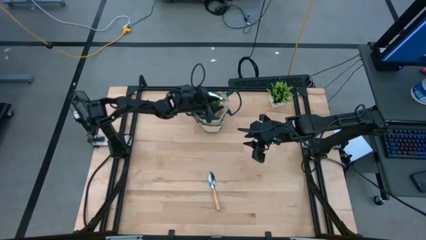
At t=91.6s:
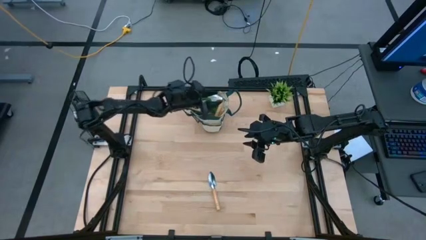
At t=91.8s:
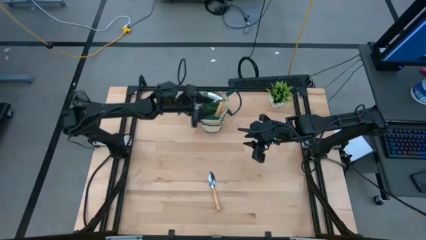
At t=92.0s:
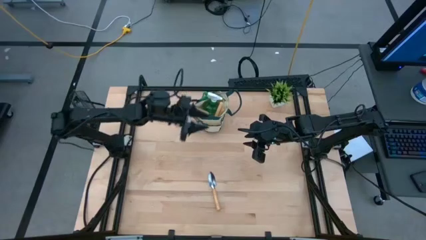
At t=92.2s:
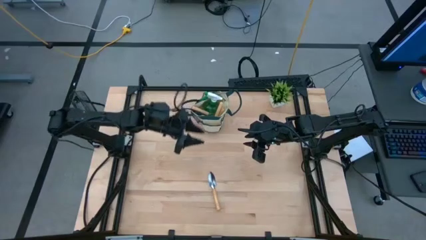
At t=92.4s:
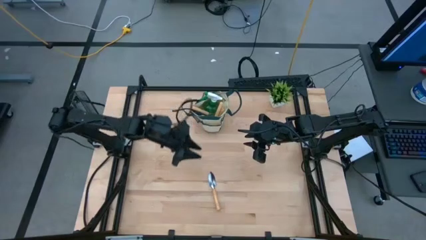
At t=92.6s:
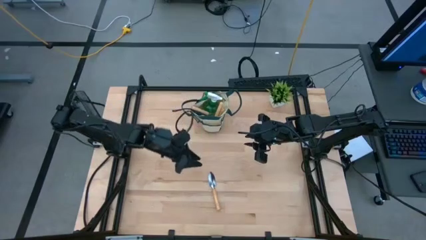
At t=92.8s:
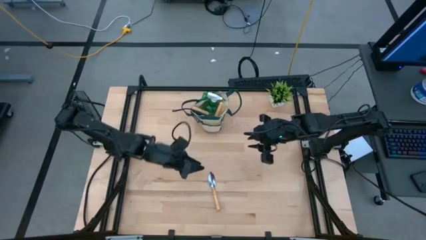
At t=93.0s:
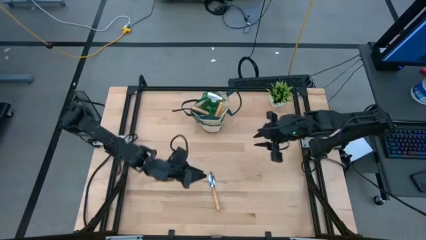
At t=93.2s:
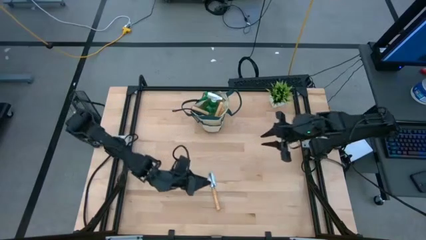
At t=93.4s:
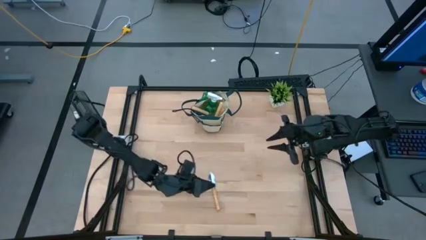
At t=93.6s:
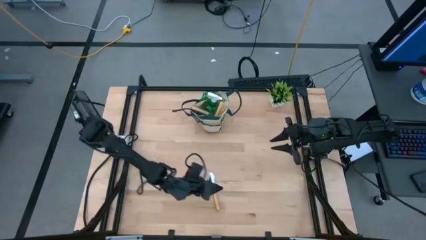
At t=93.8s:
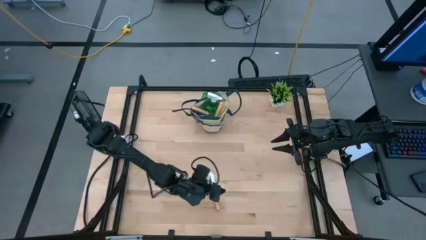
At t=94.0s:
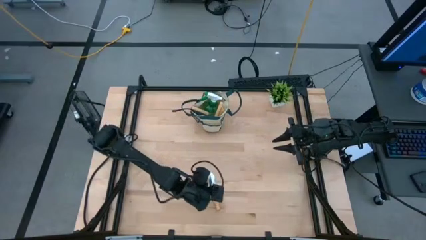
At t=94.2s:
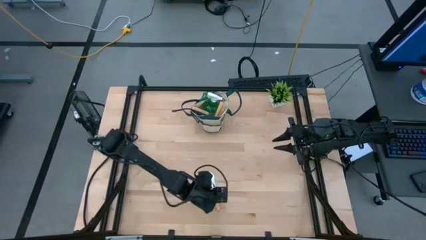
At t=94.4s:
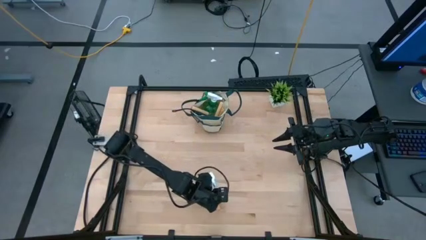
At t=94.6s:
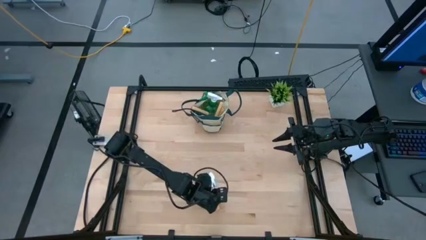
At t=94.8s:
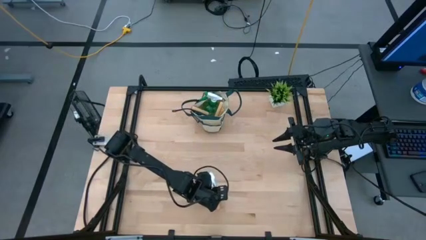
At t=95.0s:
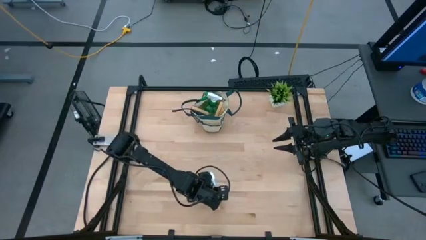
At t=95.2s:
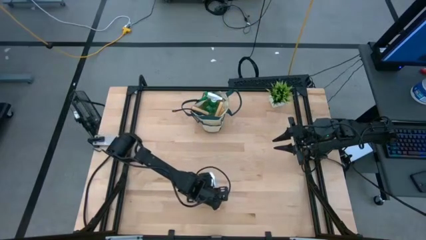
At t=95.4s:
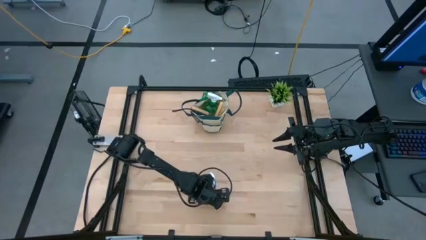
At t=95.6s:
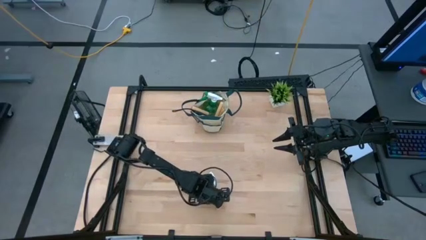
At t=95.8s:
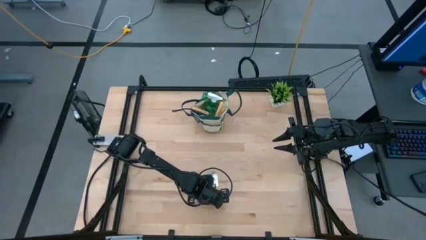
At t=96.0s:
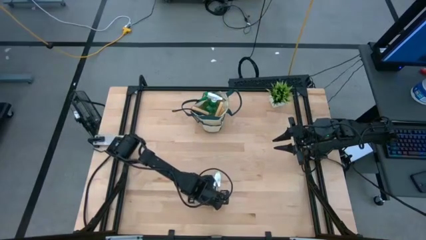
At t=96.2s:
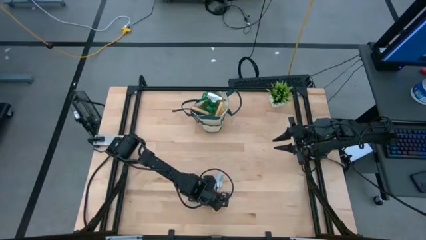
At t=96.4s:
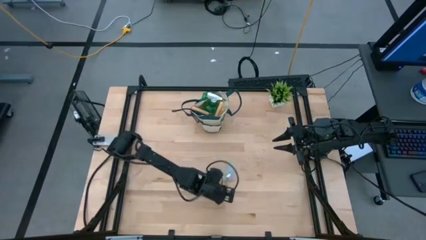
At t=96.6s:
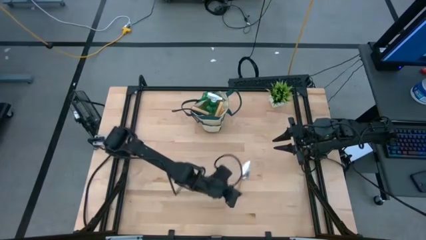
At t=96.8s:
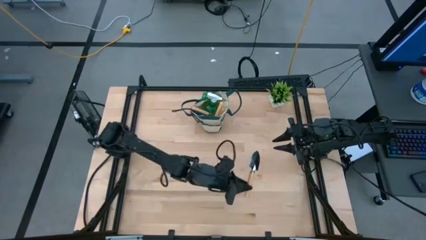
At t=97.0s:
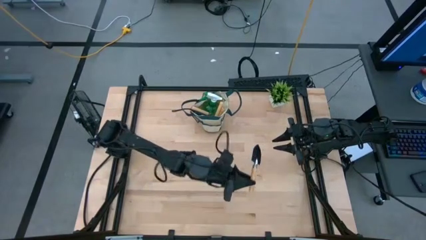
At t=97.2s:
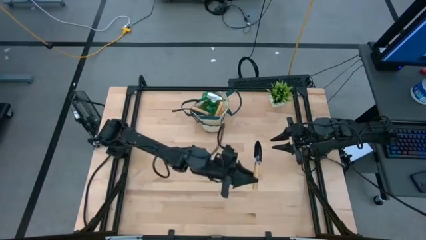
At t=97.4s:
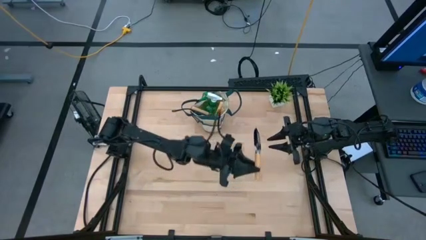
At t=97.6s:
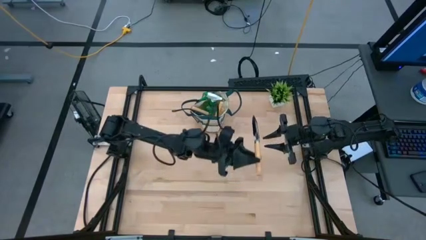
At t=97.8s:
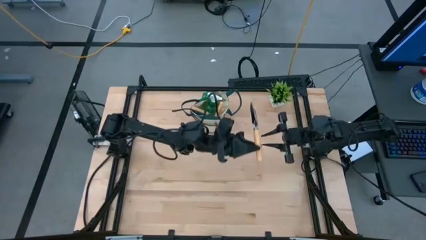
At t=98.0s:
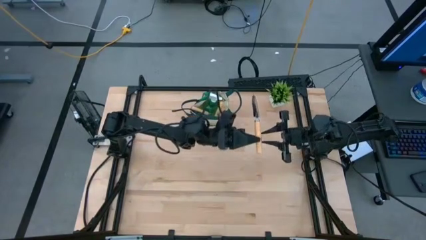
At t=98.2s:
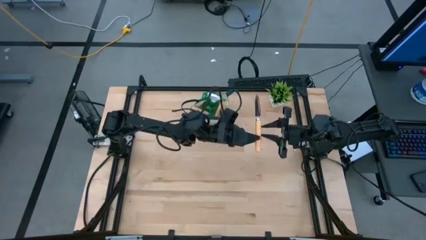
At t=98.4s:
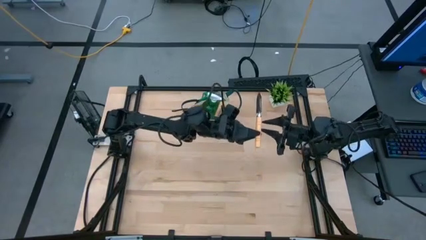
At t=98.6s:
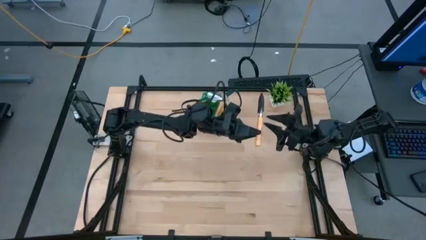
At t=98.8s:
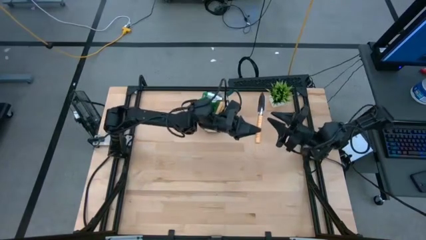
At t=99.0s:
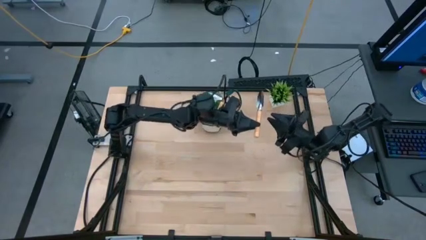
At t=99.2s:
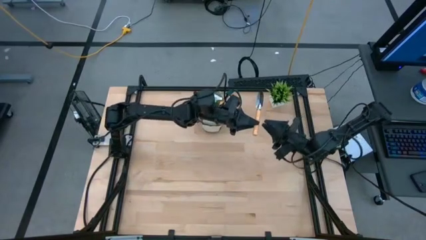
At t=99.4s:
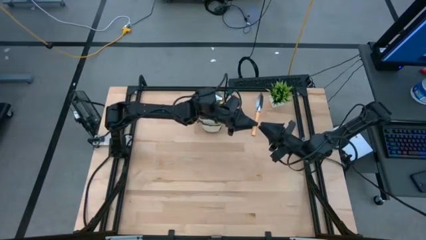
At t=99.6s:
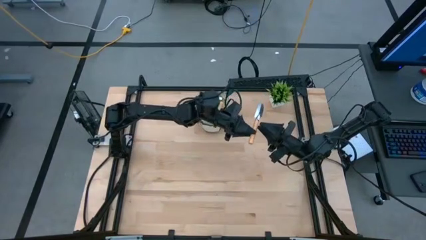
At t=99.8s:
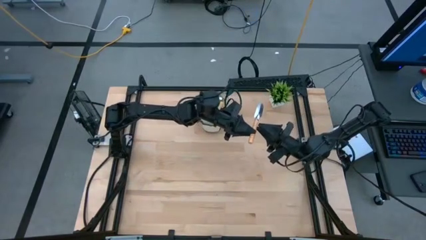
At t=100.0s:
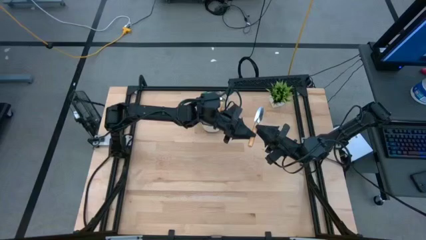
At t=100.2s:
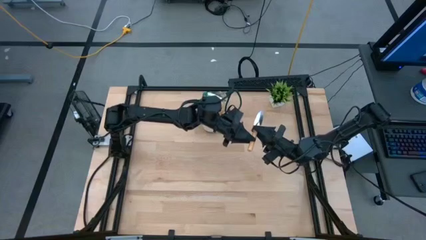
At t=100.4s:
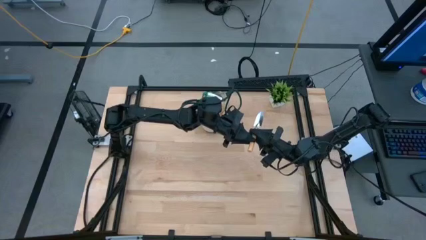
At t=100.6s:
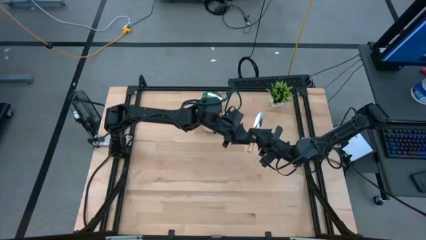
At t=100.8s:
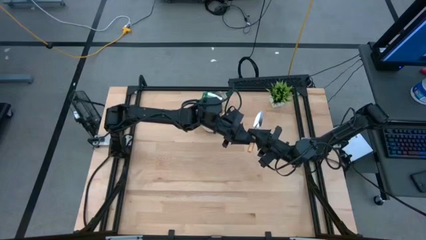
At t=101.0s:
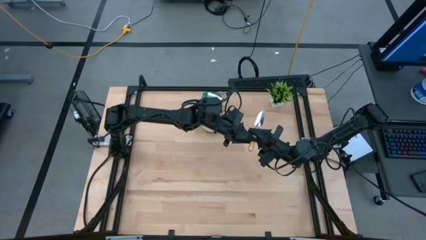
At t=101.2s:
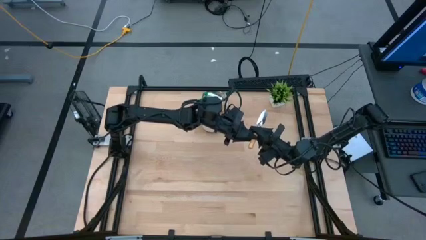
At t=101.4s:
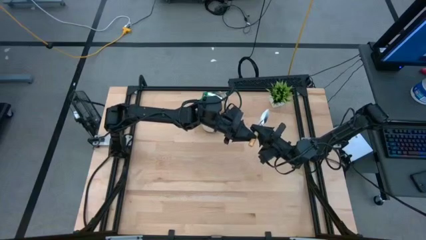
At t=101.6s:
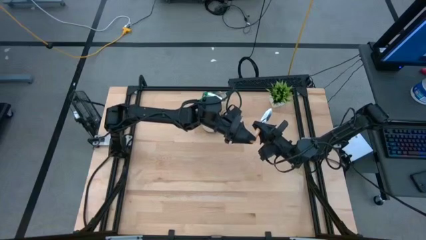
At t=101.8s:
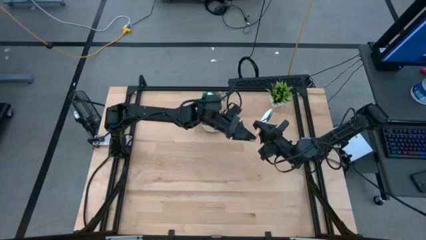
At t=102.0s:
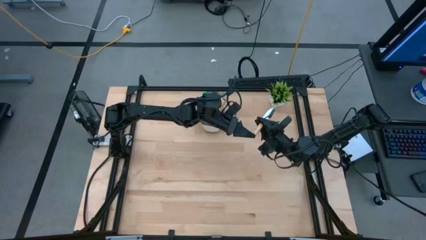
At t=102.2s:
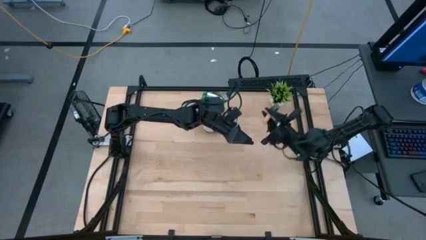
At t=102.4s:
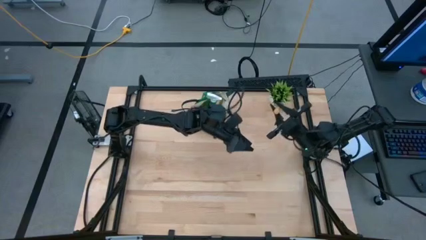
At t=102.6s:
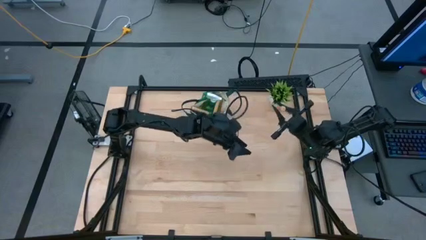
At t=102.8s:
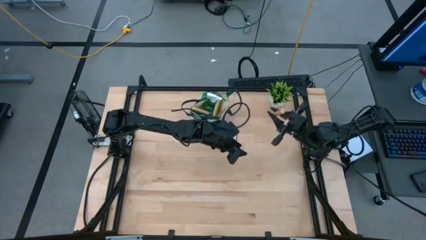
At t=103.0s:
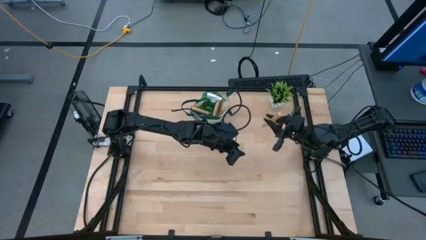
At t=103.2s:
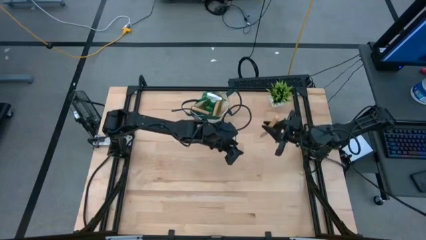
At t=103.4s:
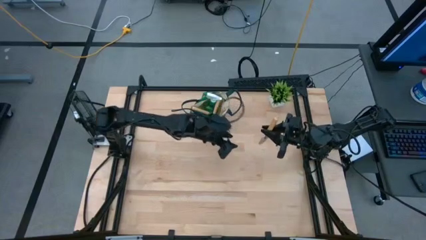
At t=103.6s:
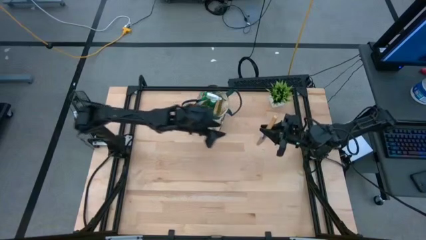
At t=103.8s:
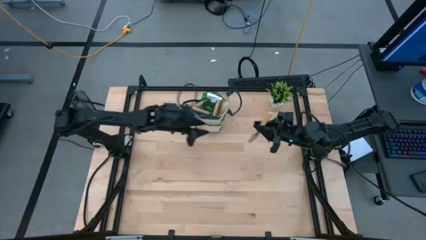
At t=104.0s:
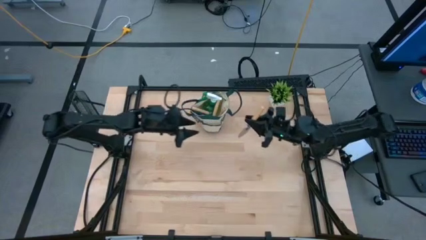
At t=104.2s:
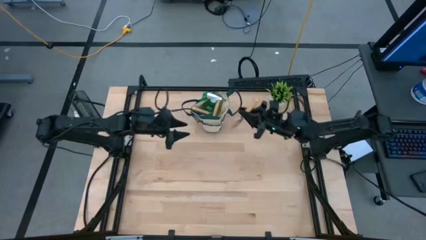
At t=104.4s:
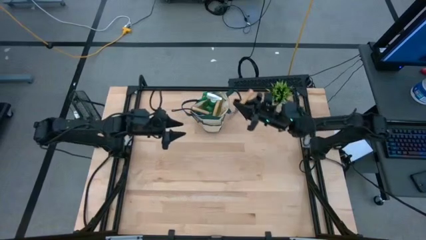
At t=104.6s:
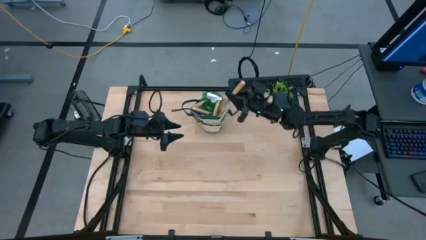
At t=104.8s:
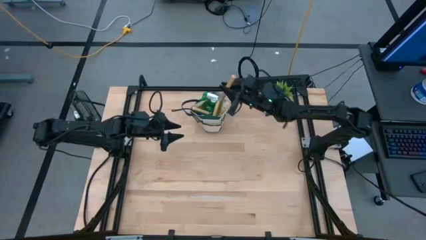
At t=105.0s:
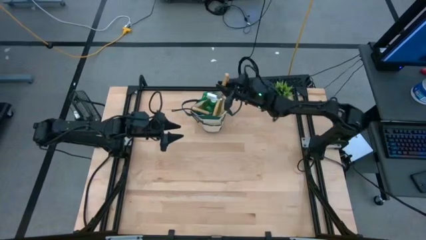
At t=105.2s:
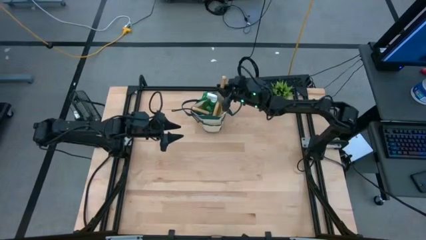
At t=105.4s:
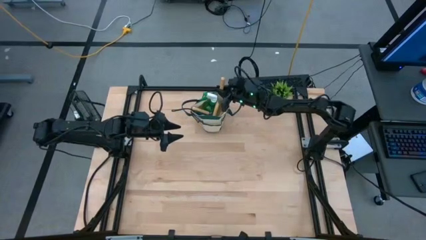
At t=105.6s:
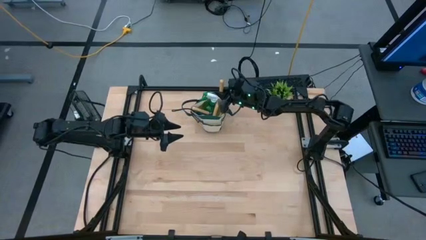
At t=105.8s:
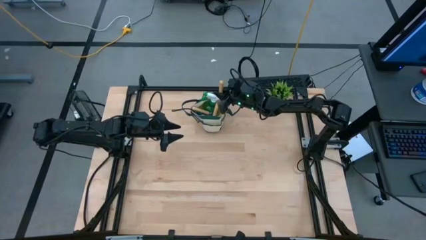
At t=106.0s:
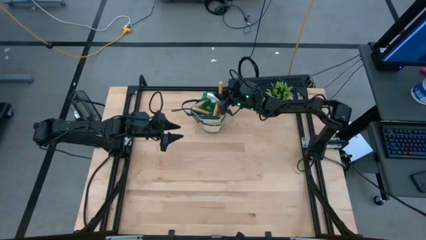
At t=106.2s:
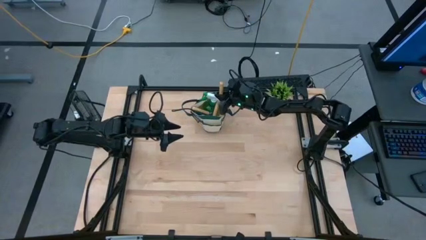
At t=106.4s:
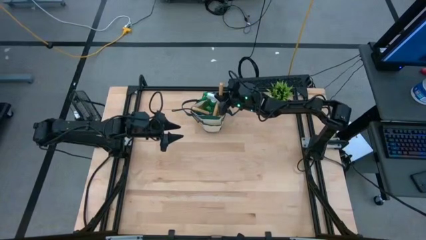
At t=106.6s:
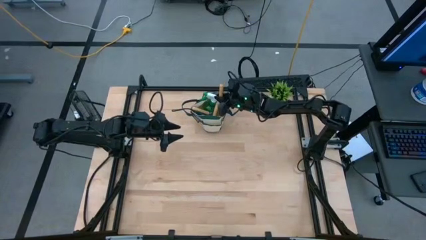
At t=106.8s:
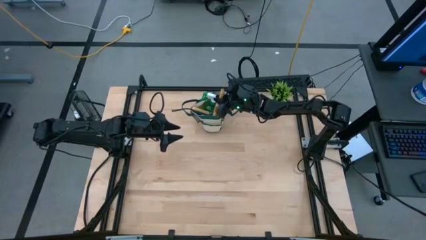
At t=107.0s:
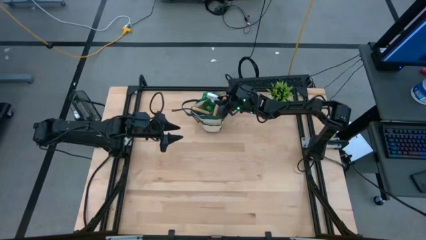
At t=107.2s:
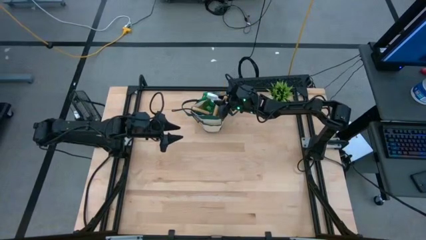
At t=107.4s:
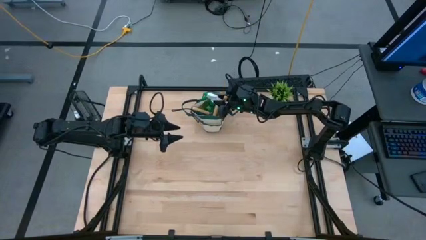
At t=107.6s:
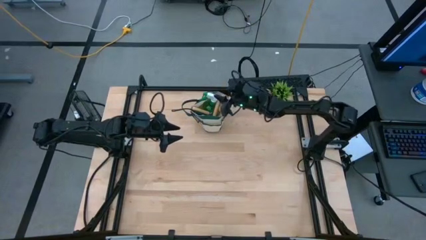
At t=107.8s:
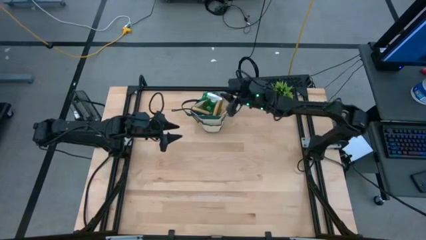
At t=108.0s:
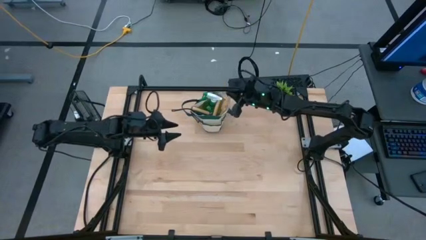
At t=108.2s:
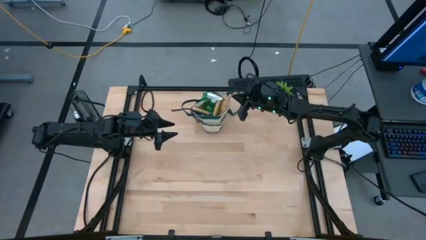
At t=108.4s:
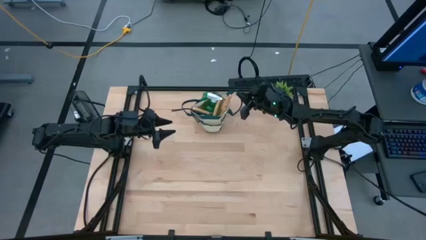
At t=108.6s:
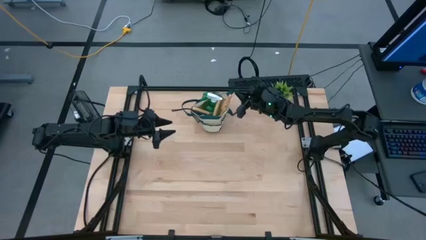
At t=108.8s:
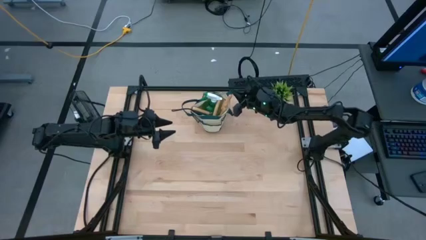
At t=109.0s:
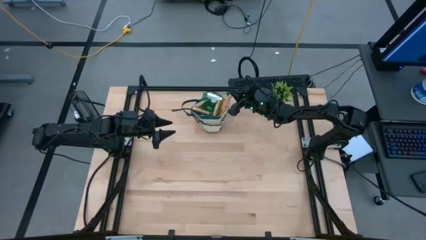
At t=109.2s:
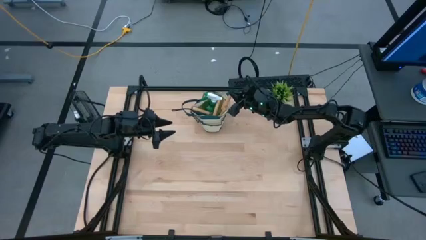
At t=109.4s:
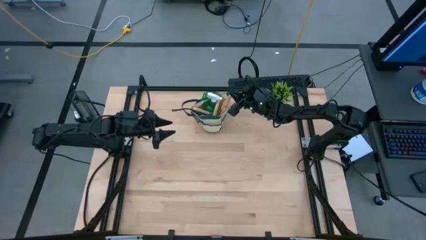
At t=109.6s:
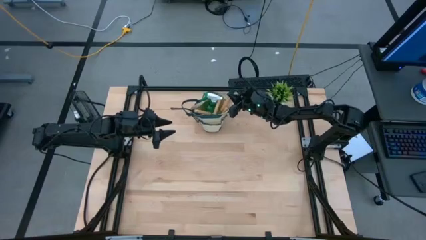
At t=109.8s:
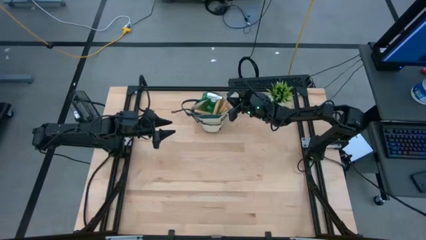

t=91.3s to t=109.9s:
Task: Pick & Place Garden tools in Gardening bag
Put the brown trowel into the gardening bag
